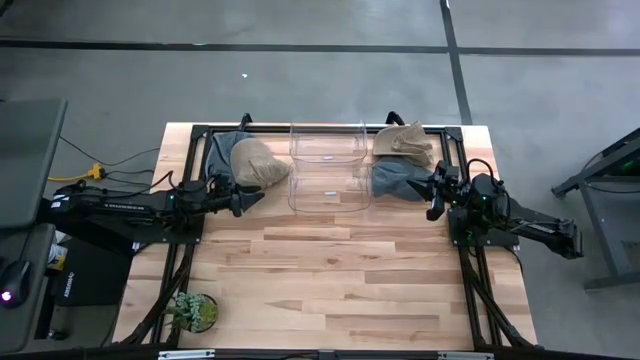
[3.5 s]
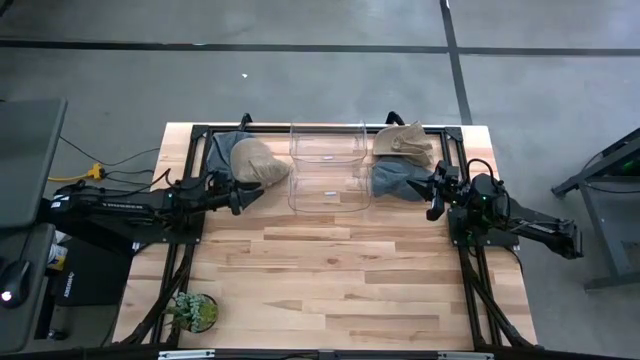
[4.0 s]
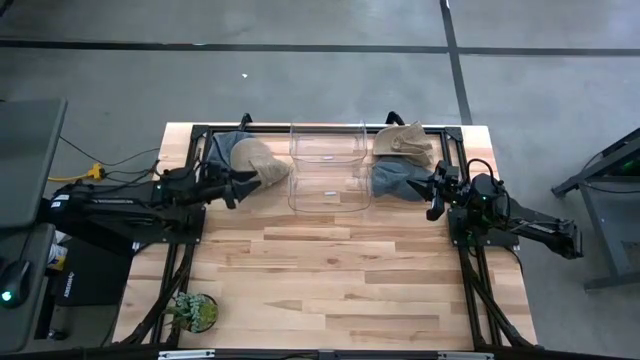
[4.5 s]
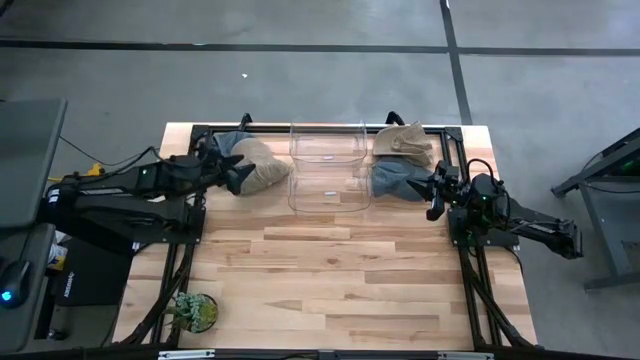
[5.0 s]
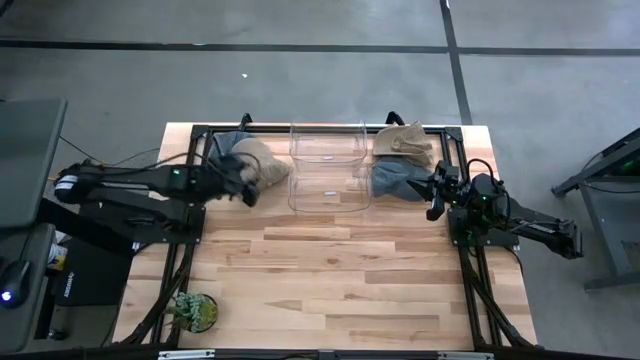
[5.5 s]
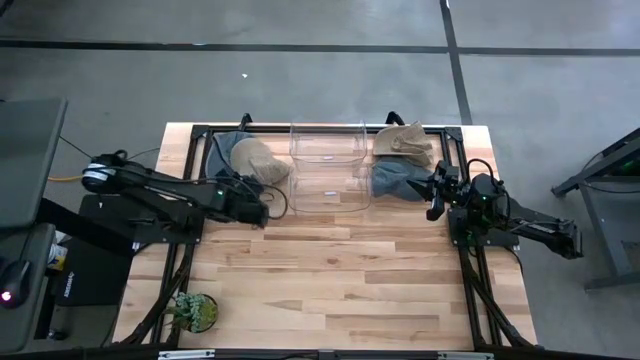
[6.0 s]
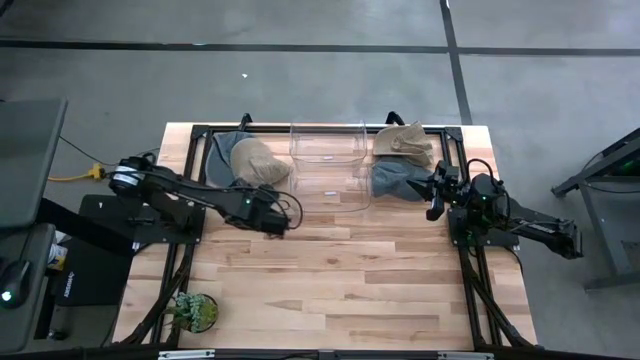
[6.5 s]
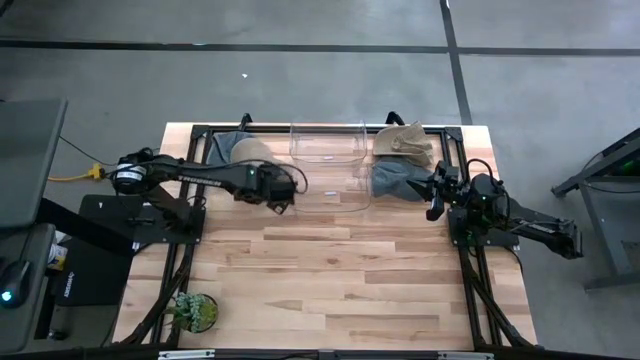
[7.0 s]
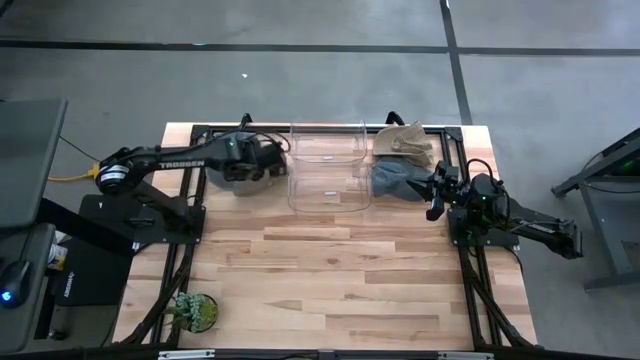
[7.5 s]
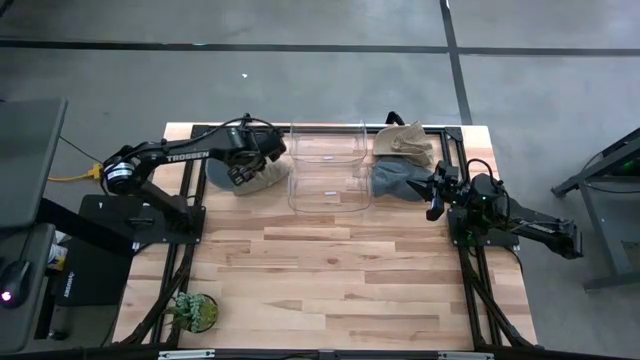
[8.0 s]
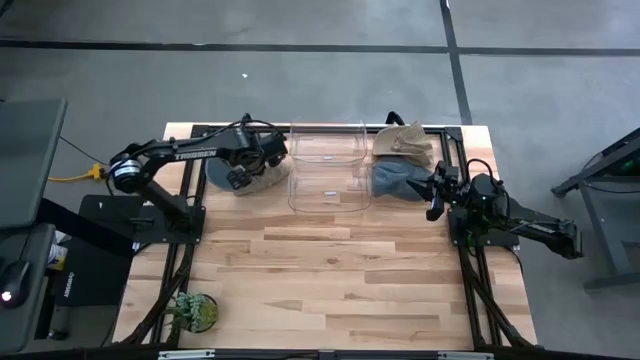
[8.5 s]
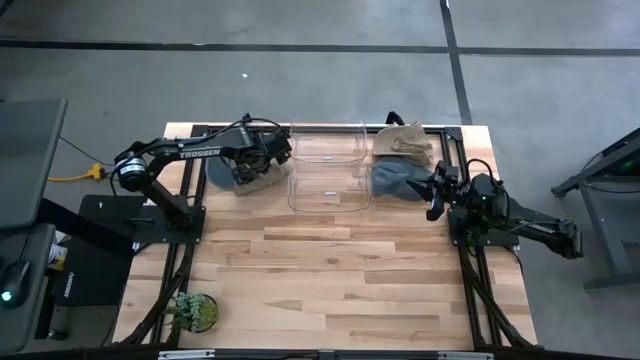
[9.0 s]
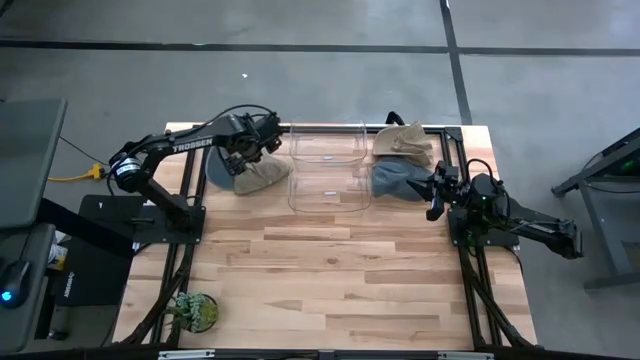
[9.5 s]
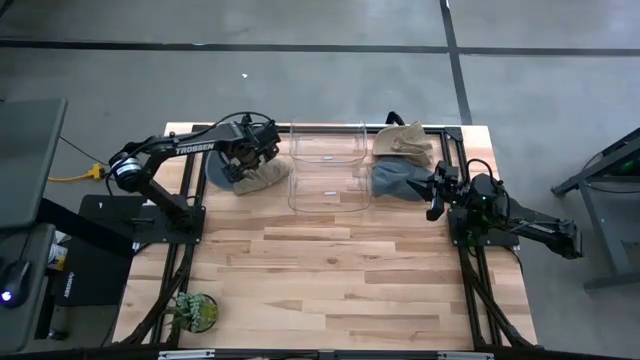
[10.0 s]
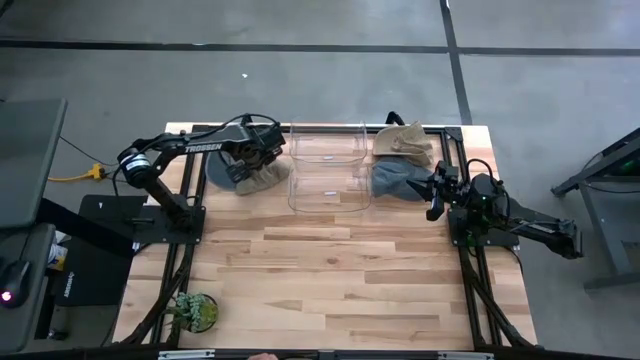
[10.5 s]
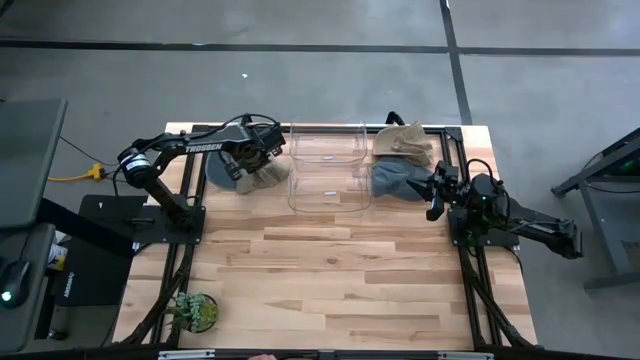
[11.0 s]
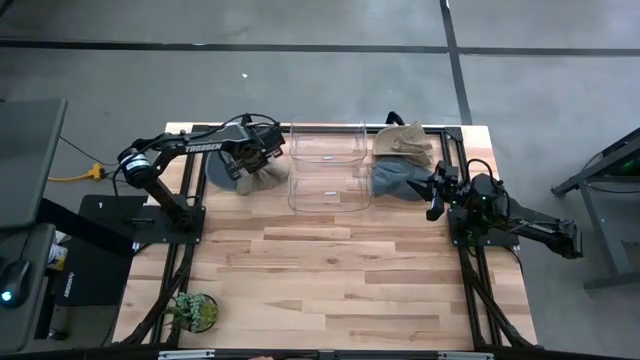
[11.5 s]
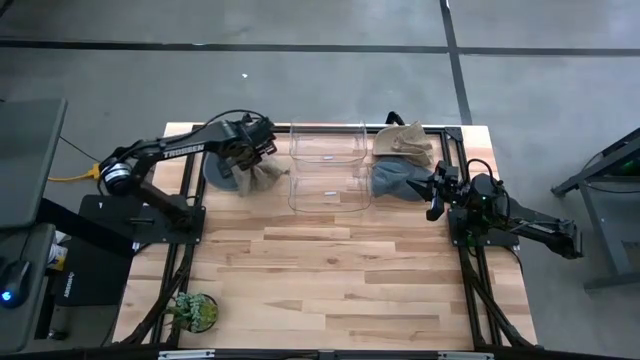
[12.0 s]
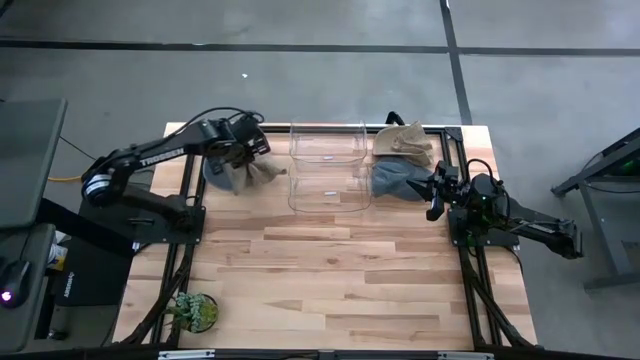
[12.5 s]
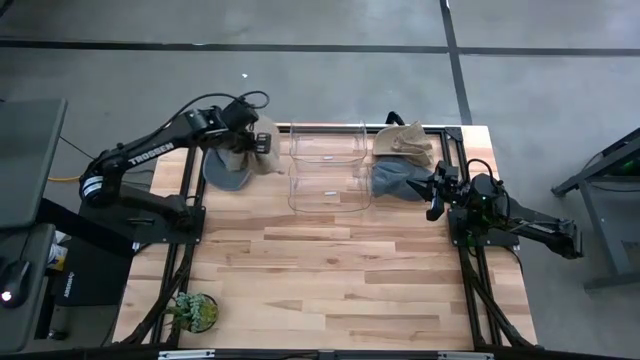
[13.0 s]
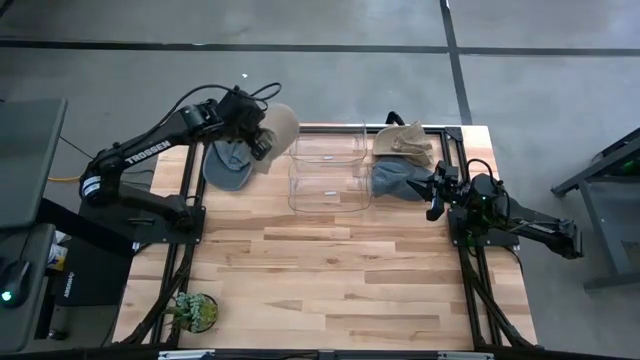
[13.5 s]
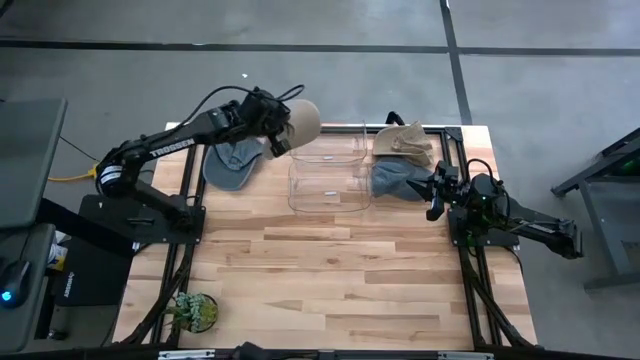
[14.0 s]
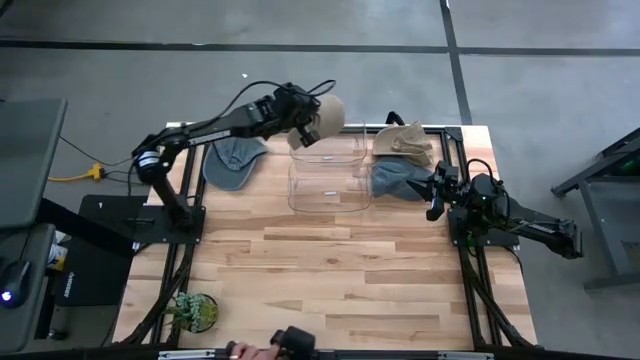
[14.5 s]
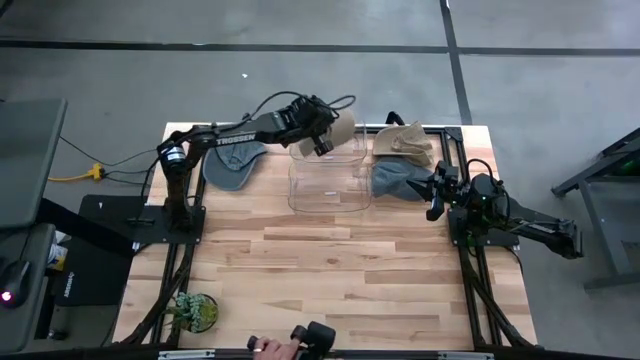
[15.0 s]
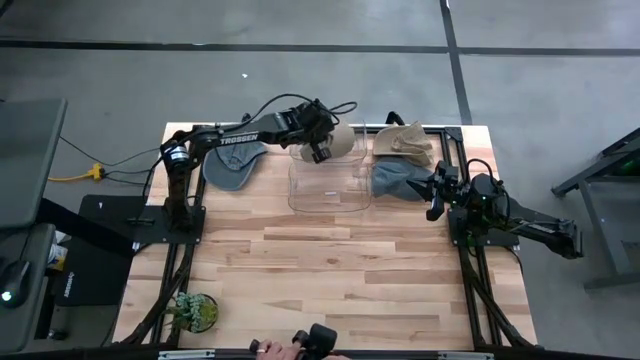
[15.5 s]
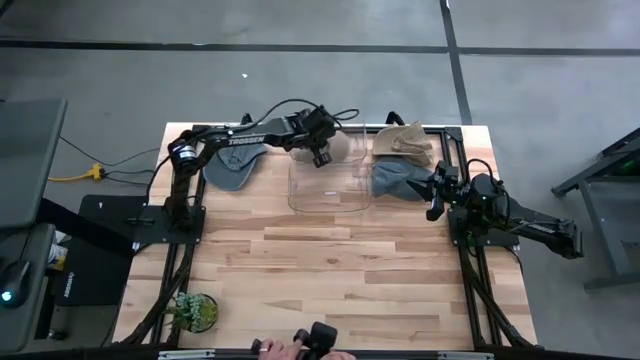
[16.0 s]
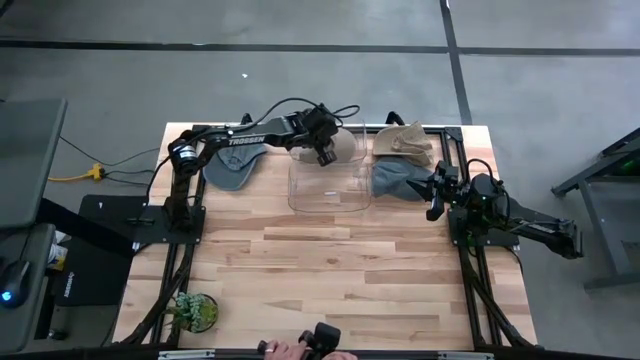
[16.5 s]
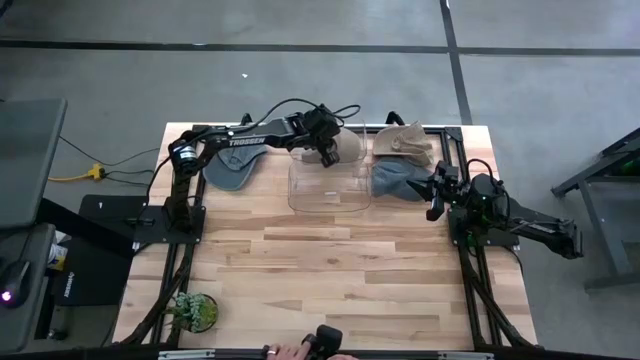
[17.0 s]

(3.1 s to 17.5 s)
Task: Pick & Place hat
Put the left brown cap into the top transparent bin

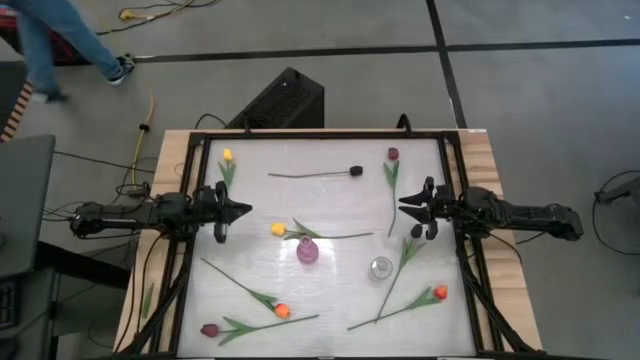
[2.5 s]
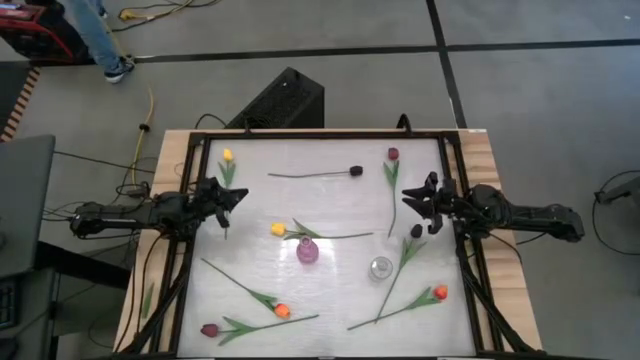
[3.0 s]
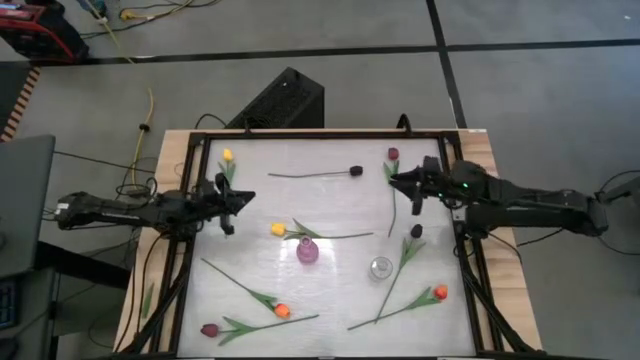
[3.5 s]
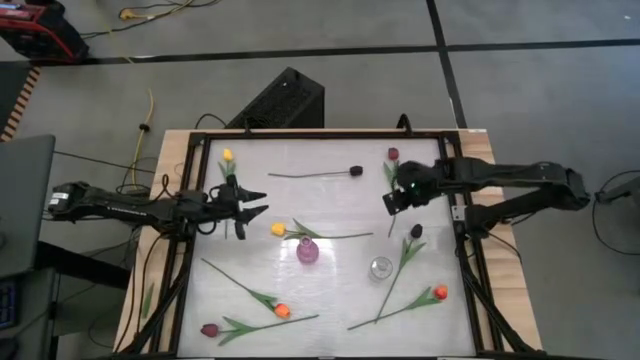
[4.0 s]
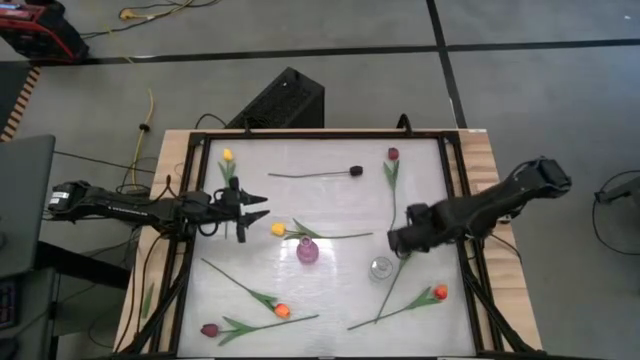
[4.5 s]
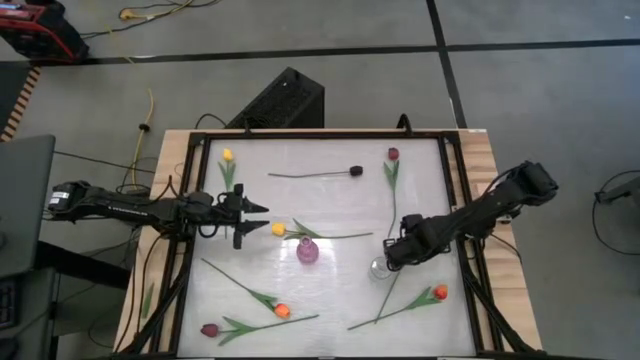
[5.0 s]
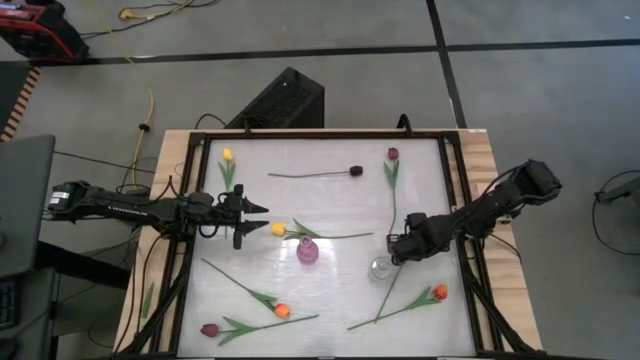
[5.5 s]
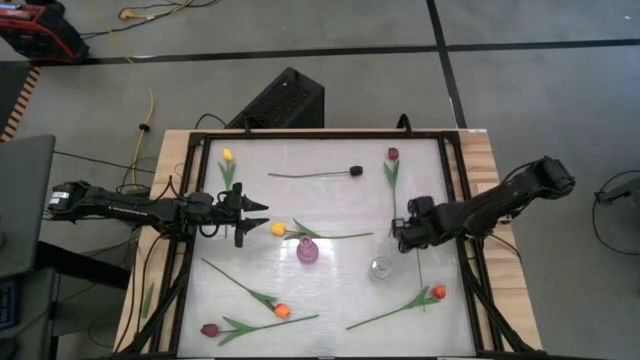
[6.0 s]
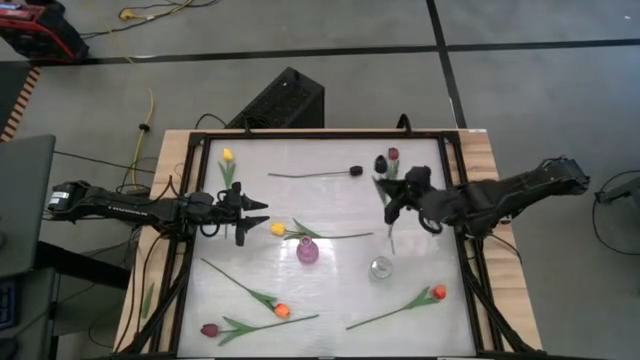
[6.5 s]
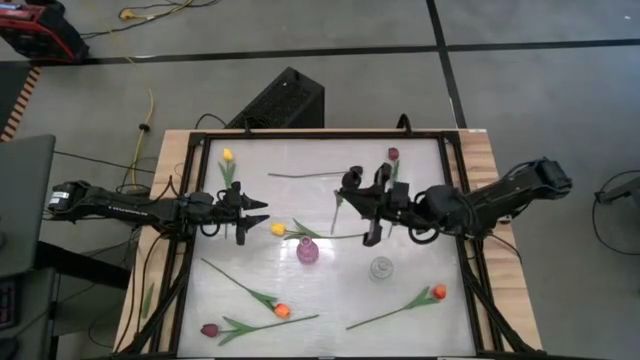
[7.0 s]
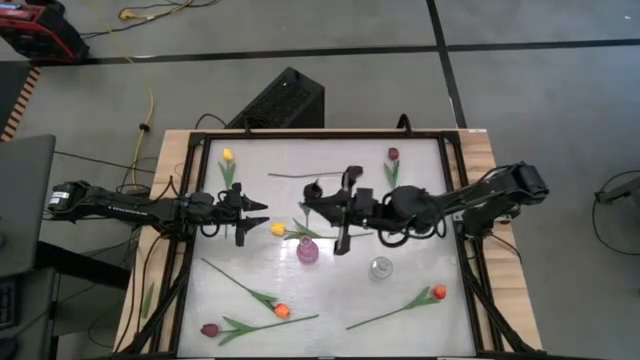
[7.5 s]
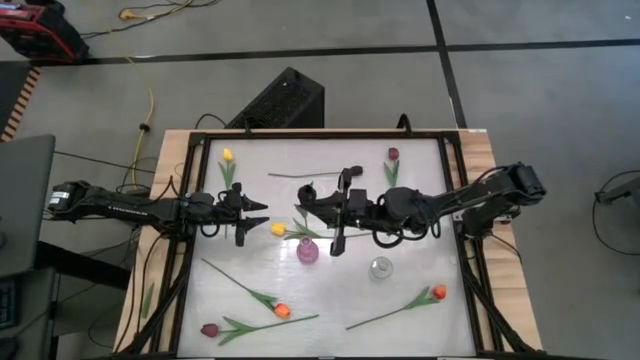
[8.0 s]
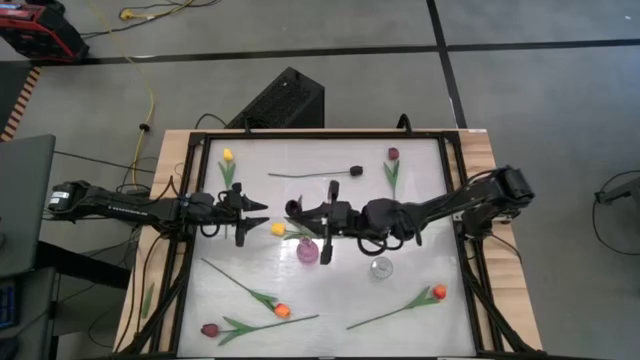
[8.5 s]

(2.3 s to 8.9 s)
Task: Sort flowers into vase by color
Put the bottom black flower into the pink vase
